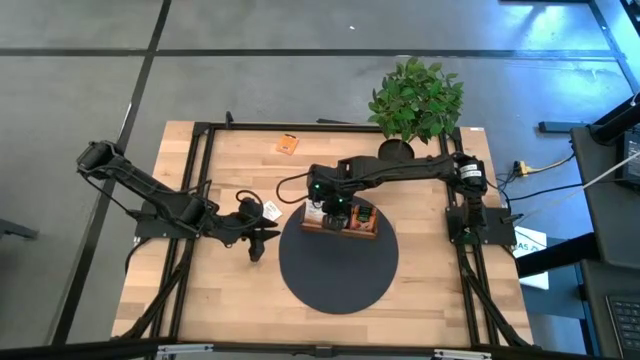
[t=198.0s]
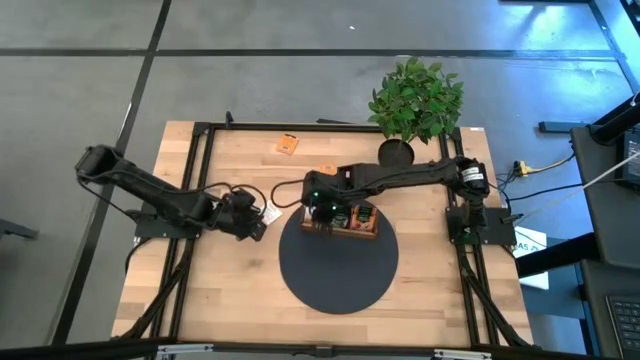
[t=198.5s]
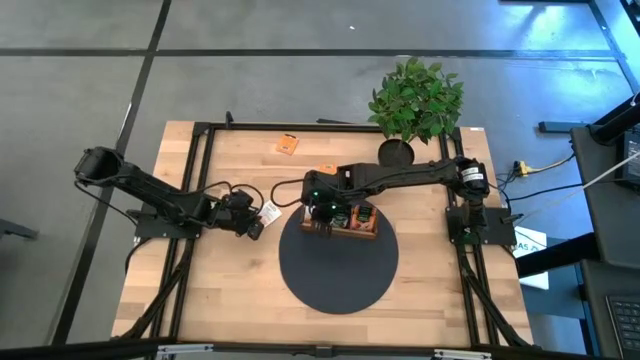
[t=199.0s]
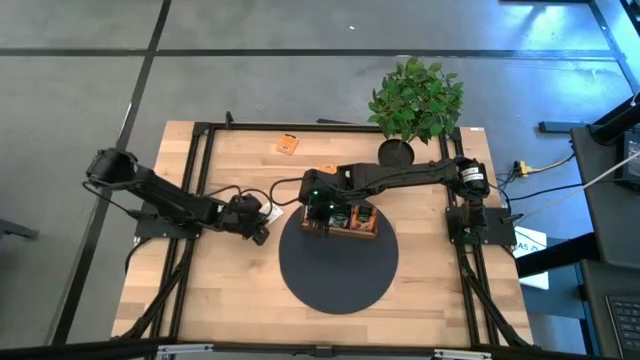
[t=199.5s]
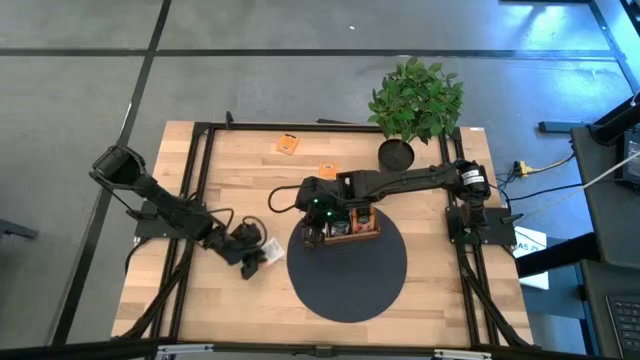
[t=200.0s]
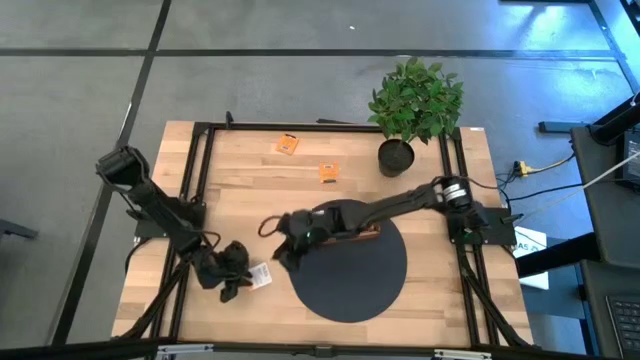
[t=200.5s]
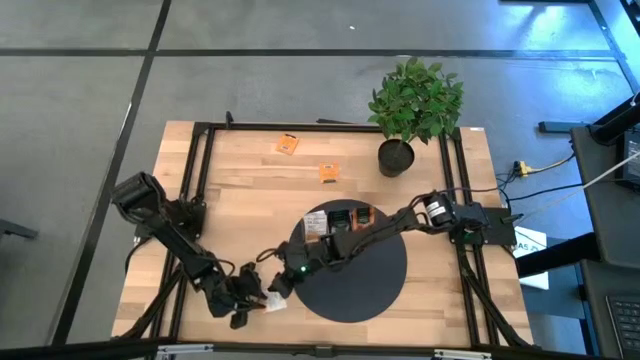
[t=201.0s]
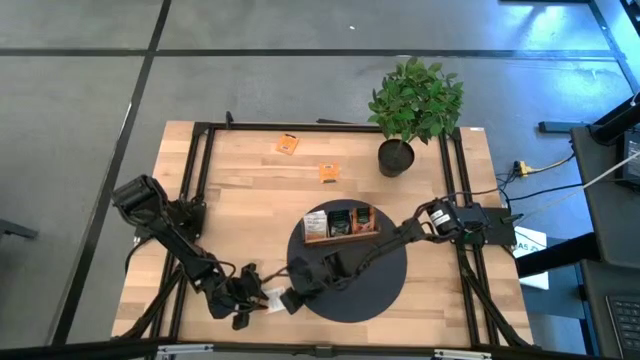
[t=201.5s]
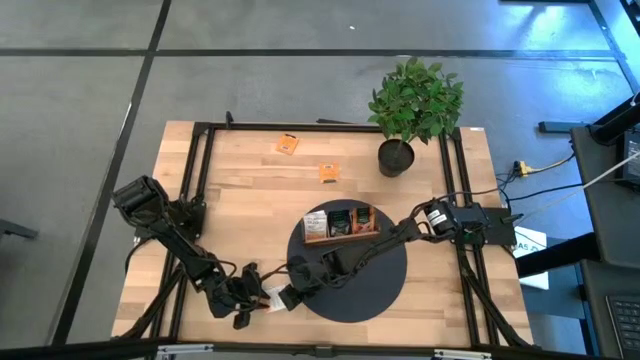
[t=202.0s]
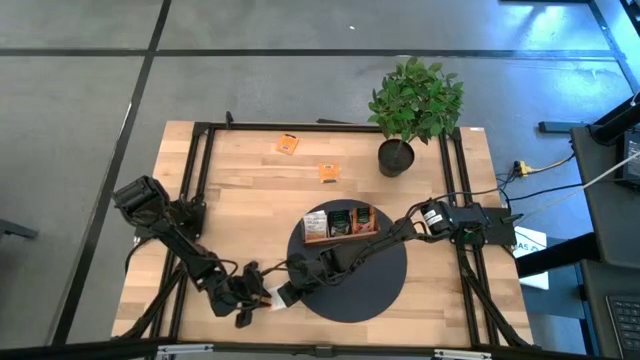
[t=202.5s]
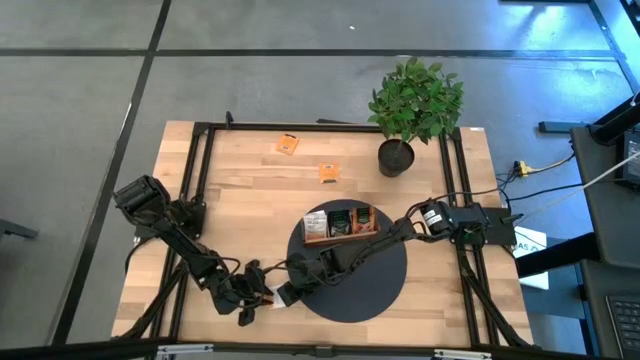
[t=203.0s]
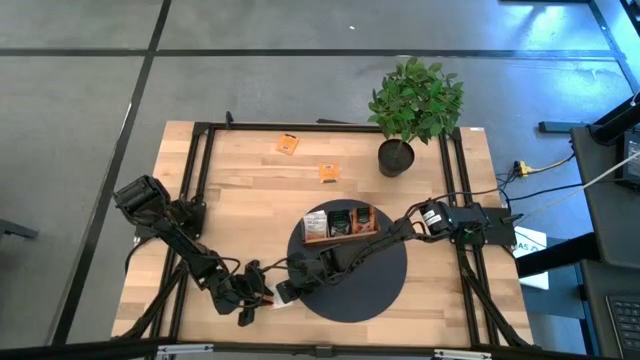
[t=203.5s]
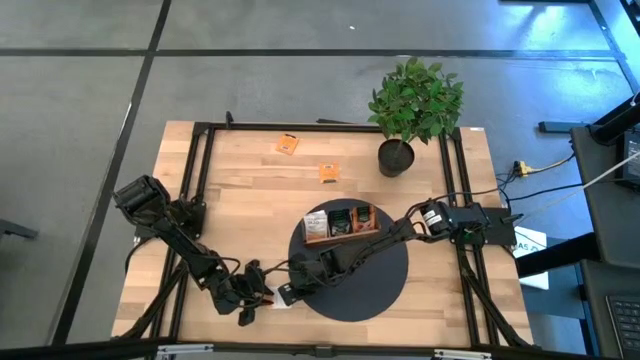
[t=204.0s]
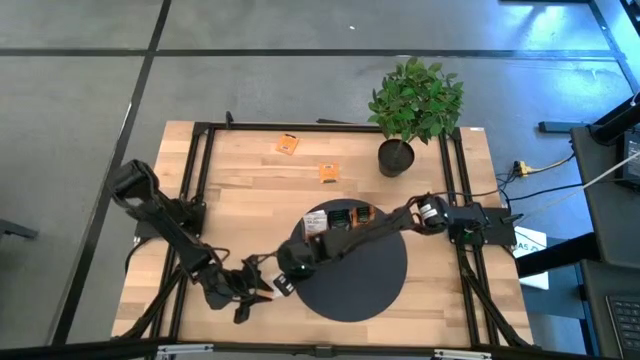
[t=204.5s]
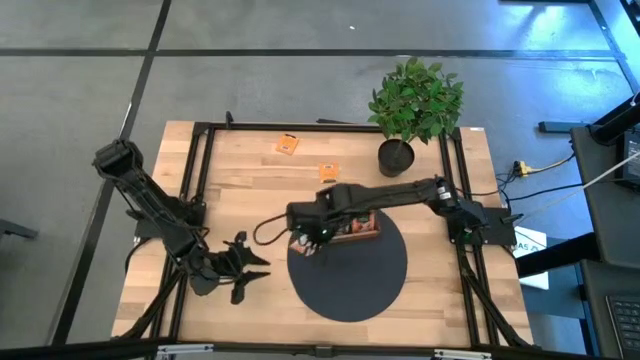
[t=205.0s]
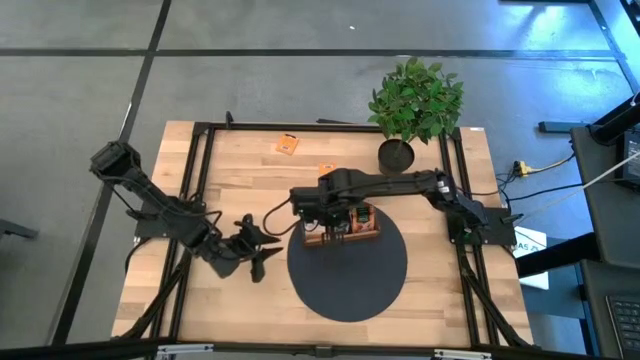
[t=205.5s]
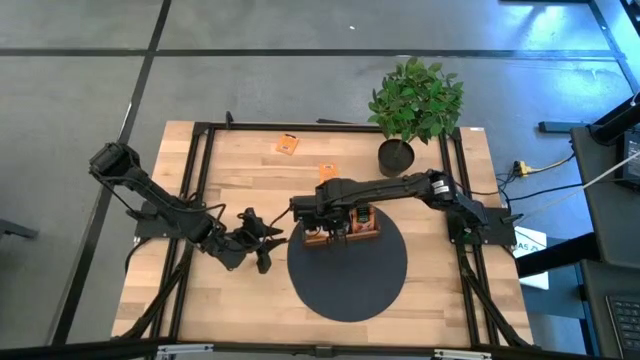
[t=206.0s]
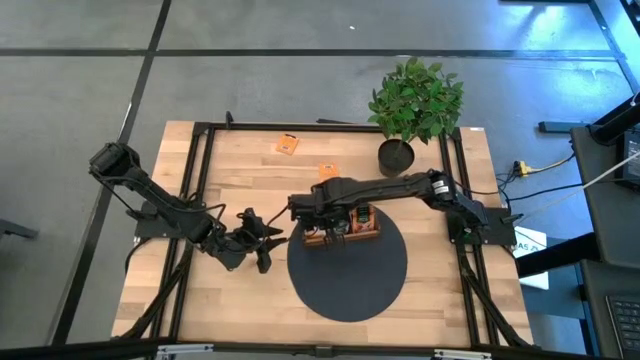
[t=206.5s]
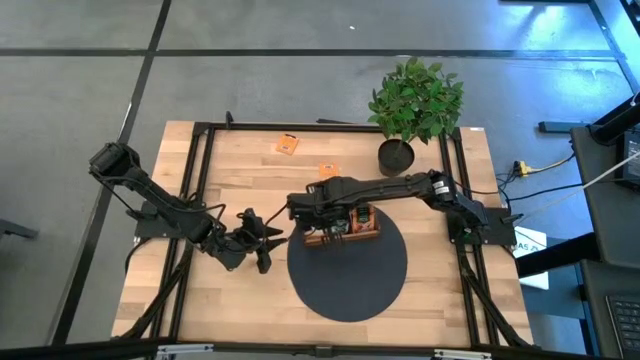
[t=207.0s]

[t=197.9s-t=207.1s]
Task: Pick & Place Tea
Put the white tea bag into the left section of the wooden organizer

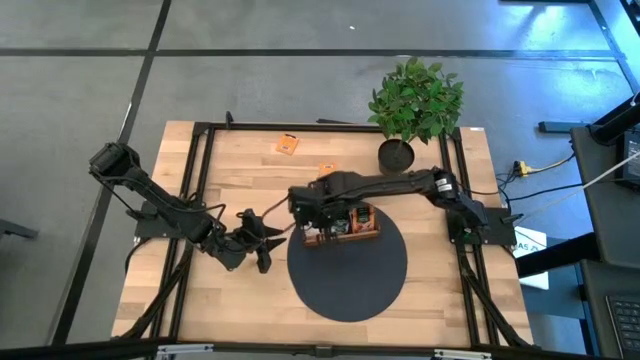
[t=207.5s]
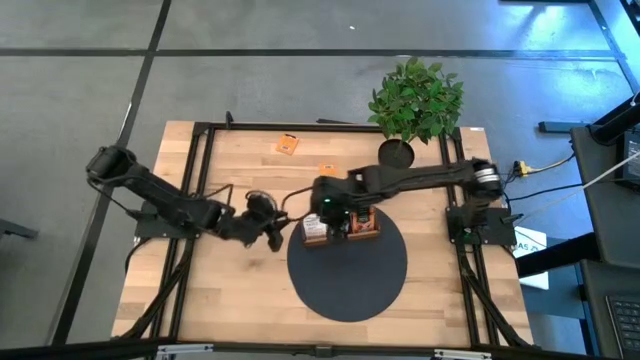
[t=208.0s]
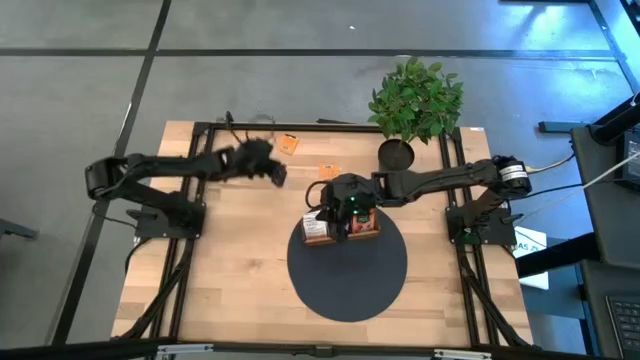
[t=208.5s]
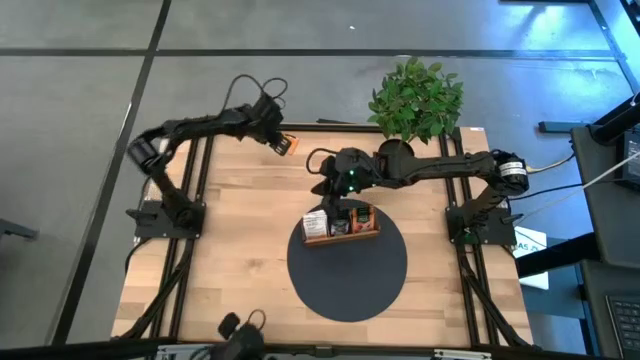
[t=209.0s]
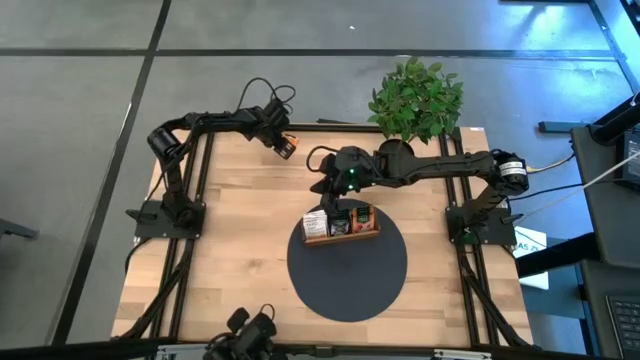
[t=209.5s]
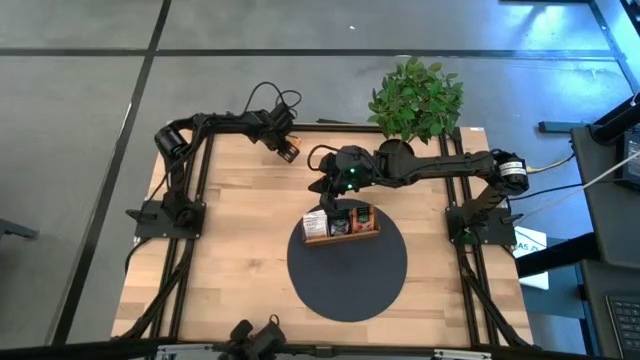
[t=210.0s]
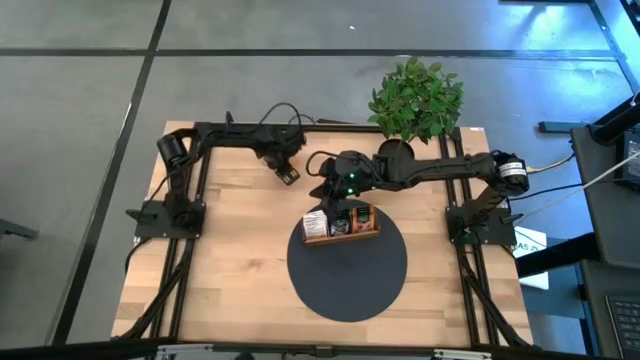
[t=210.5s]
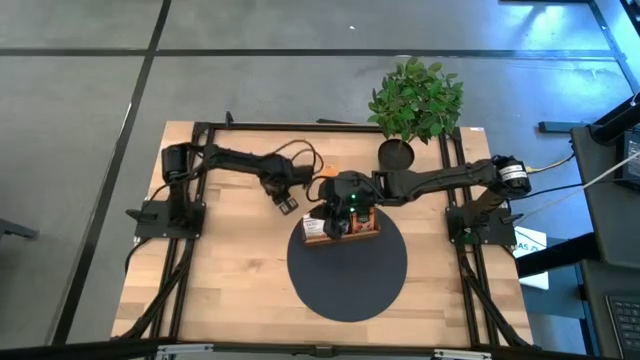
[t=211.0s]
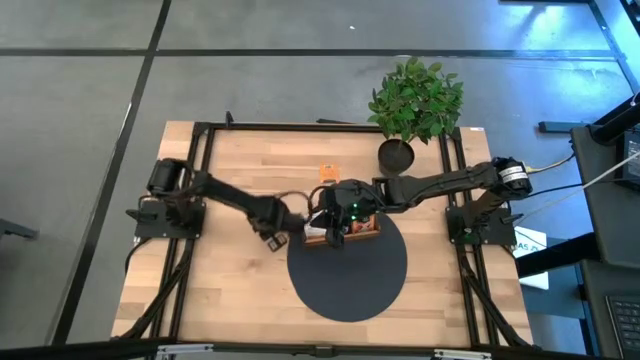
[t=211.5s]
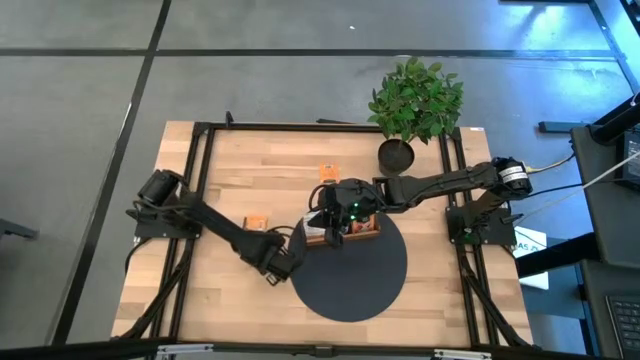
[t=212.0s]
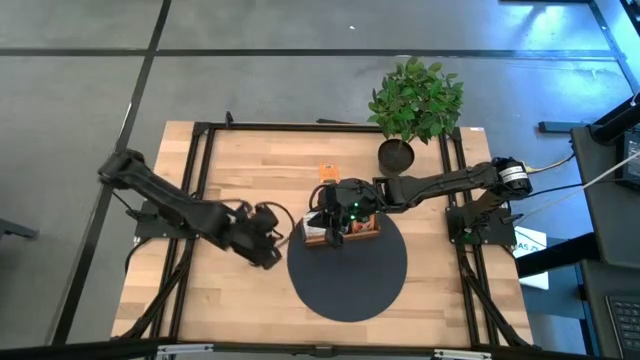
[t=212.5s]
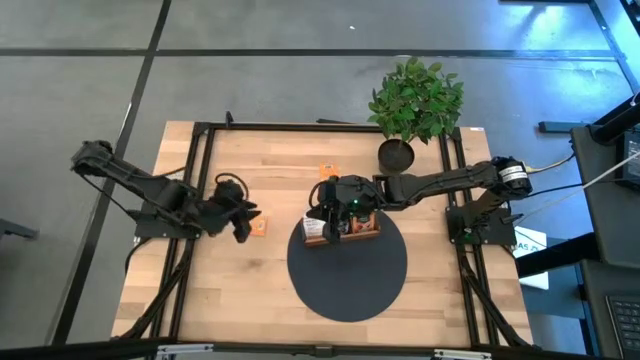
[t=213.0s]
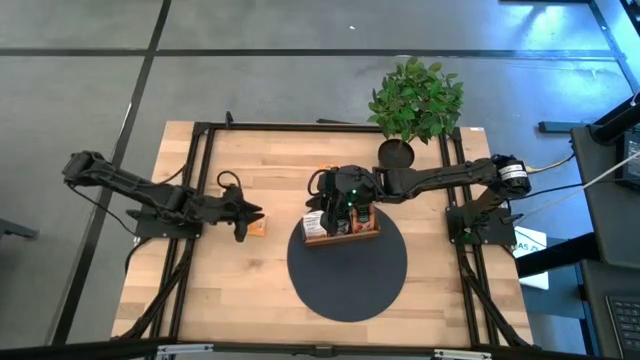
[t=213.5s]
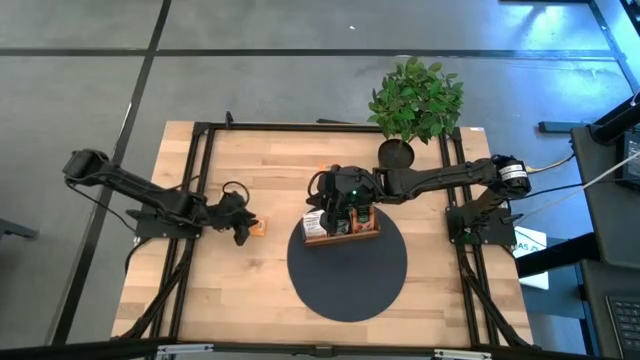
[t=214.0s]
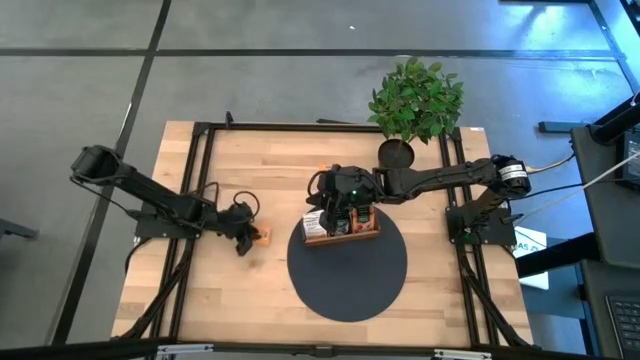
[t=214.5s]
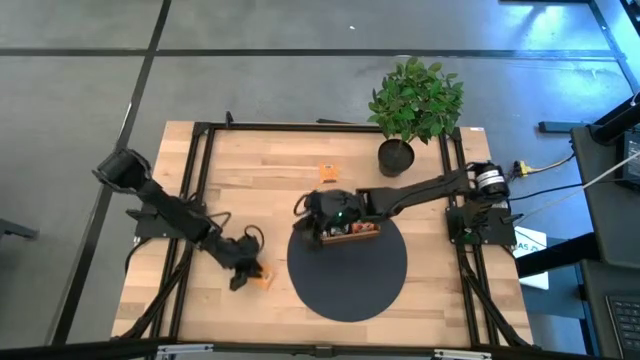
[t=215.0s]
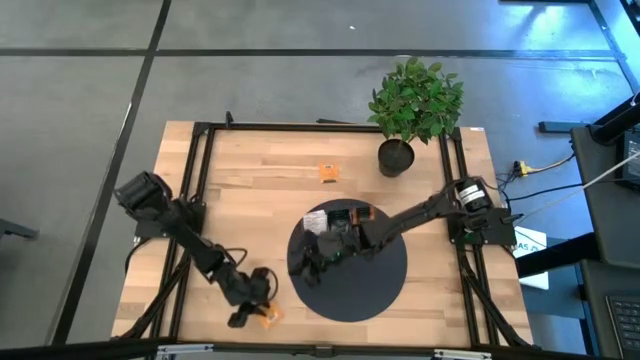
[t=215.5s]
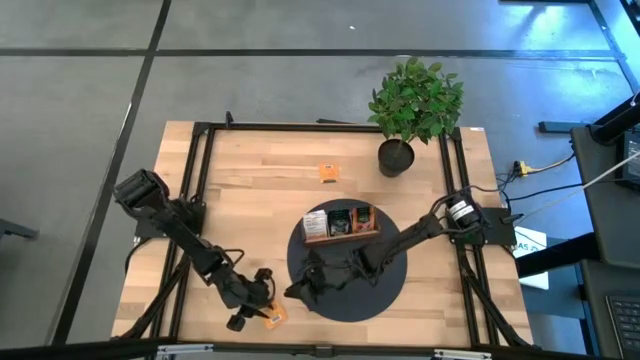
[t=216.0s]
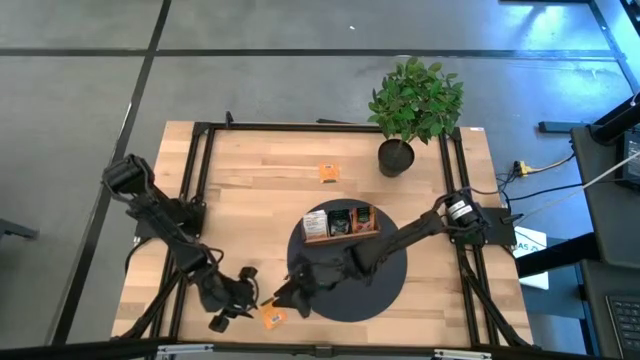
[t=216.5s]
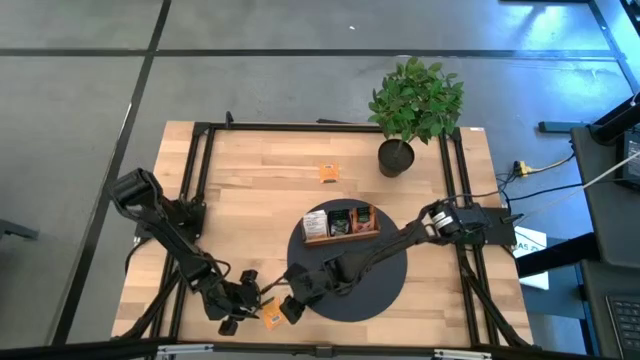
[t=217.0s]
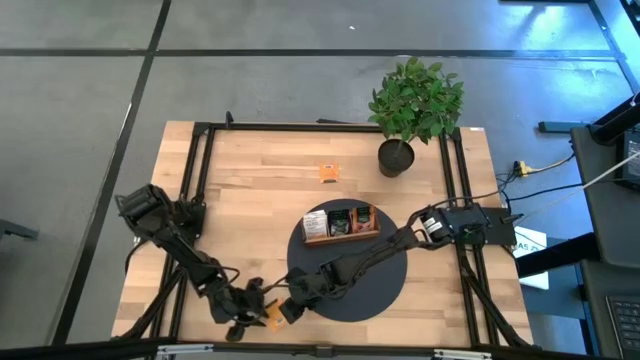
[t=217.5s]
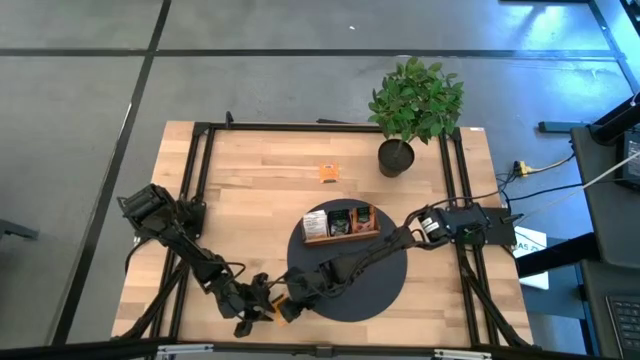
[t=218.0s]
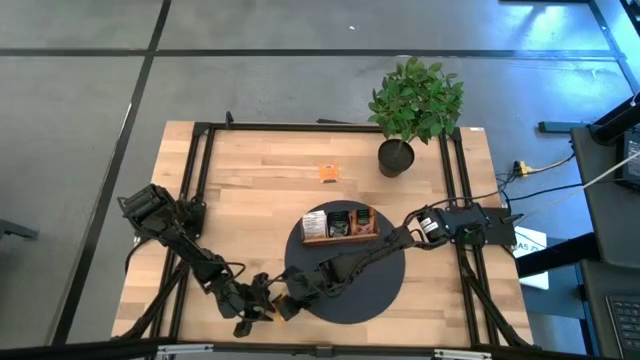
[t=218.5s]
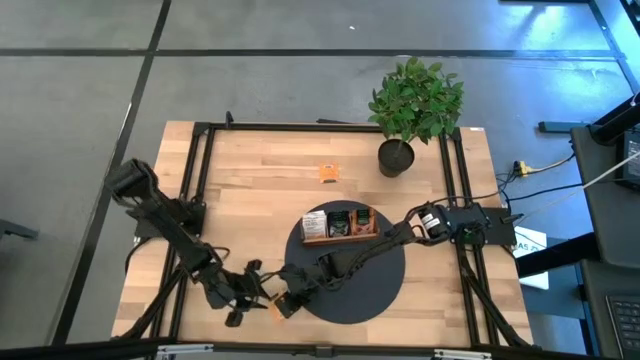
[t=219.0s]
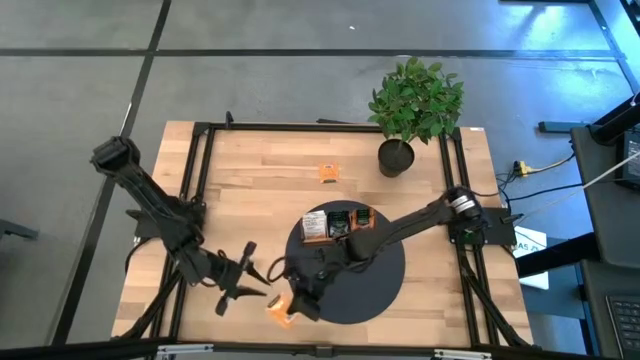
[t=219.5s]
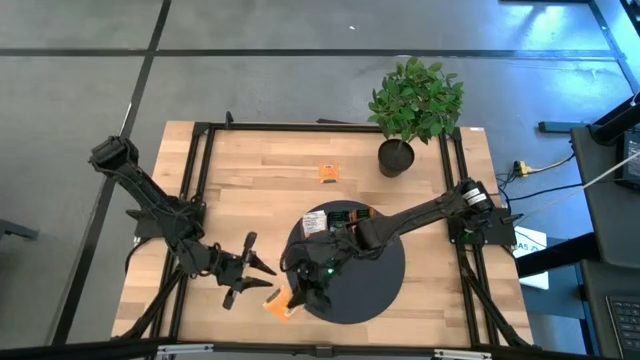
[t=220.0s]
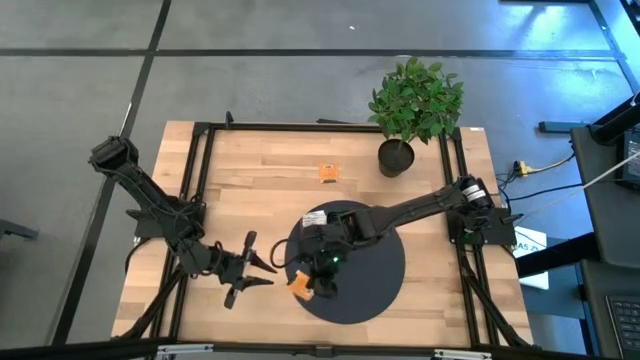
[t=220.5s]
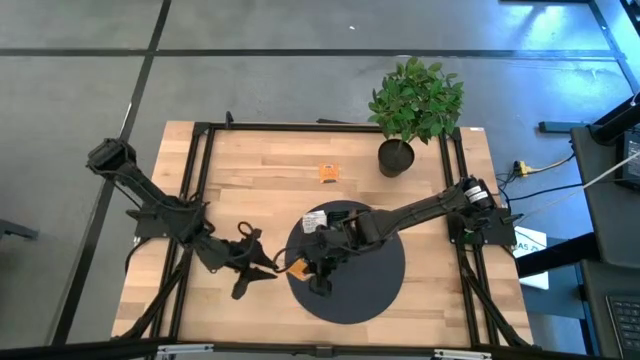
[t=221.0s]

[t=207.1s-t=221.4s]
Put the orange tea bag into the right section of the wooden organizer
